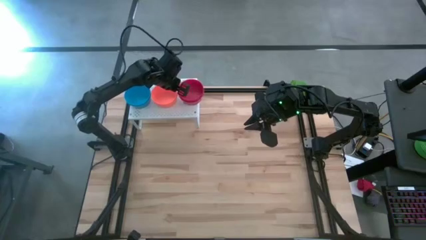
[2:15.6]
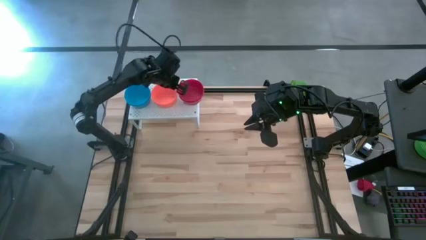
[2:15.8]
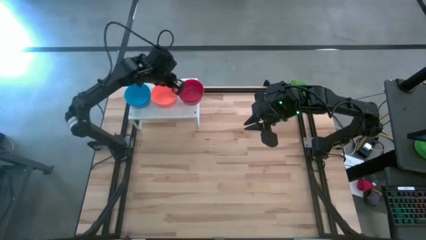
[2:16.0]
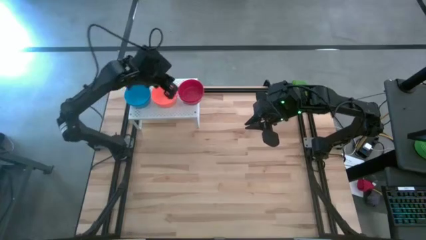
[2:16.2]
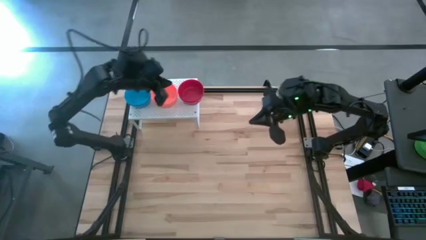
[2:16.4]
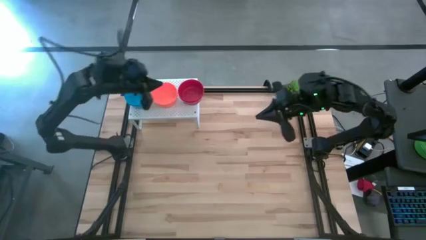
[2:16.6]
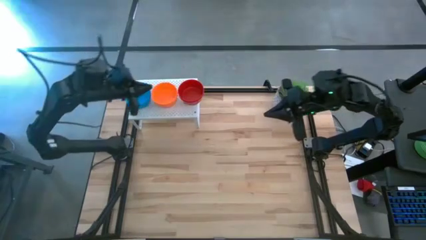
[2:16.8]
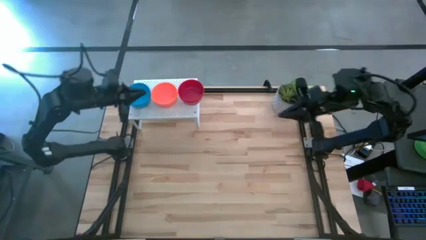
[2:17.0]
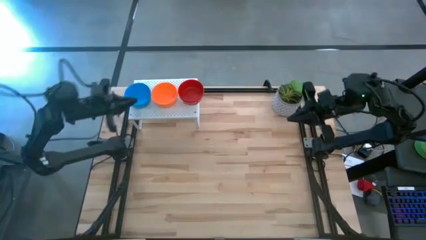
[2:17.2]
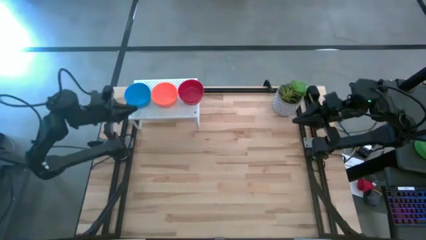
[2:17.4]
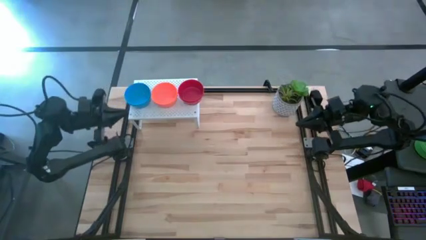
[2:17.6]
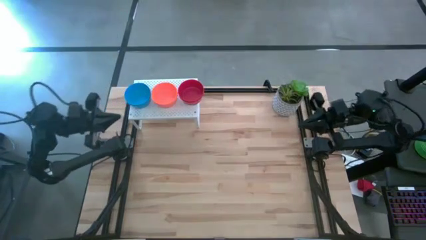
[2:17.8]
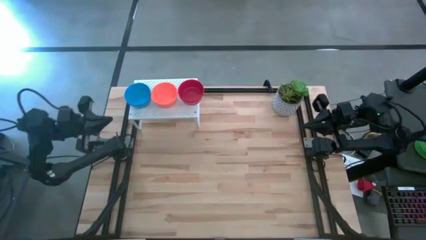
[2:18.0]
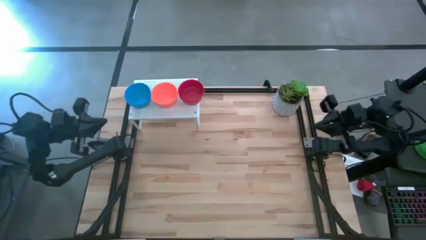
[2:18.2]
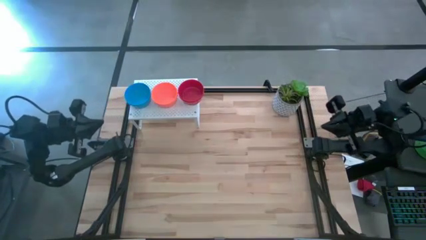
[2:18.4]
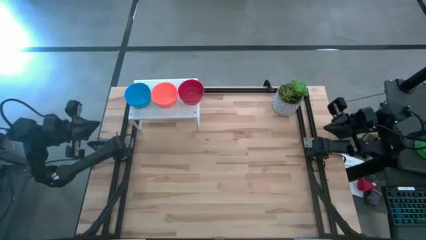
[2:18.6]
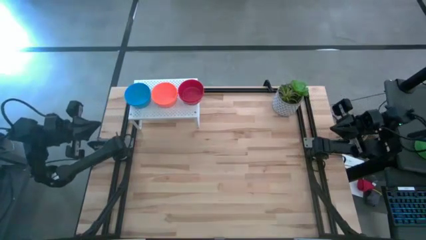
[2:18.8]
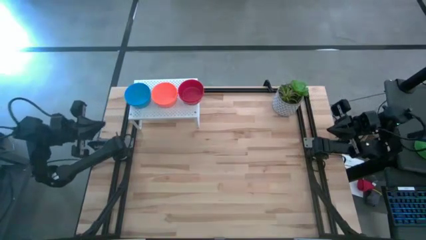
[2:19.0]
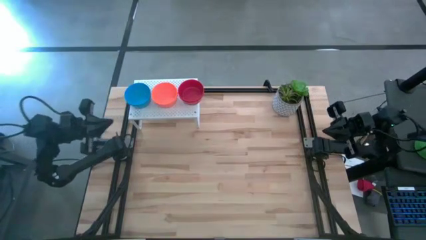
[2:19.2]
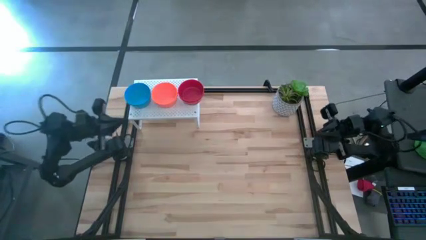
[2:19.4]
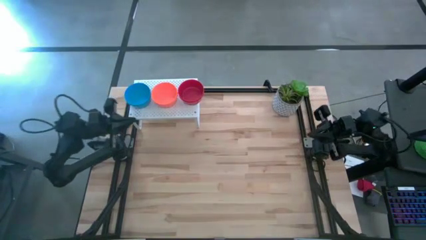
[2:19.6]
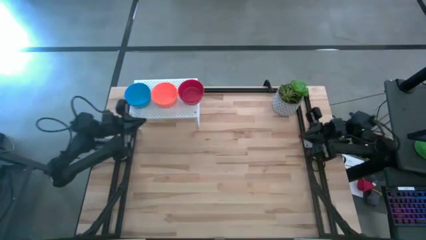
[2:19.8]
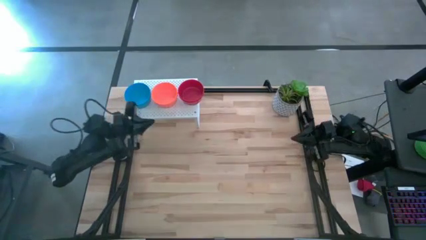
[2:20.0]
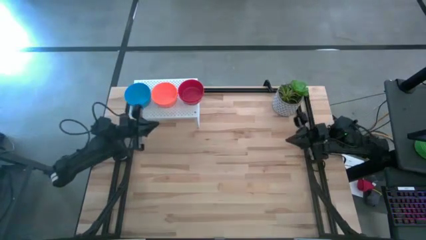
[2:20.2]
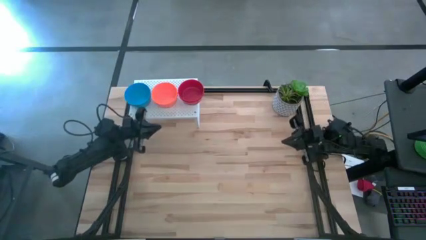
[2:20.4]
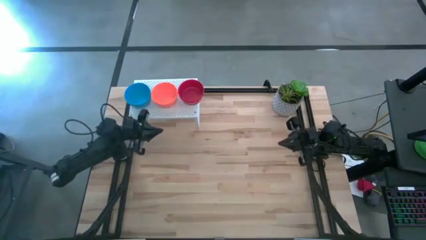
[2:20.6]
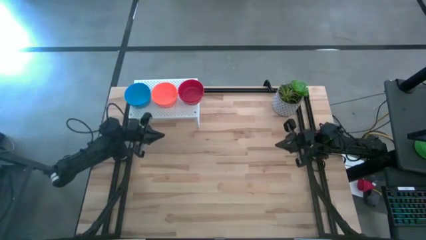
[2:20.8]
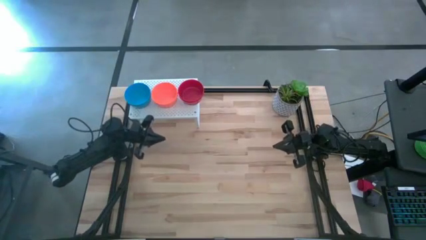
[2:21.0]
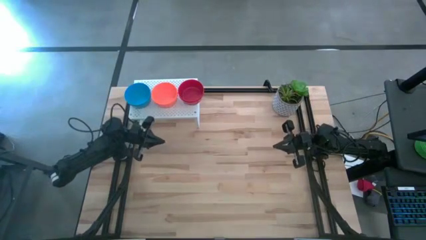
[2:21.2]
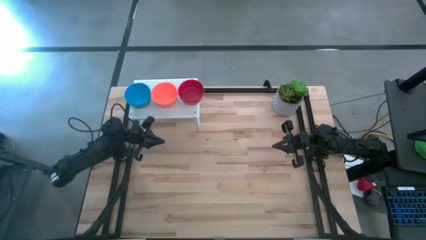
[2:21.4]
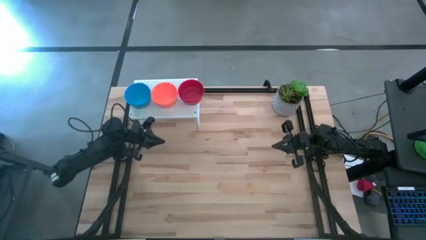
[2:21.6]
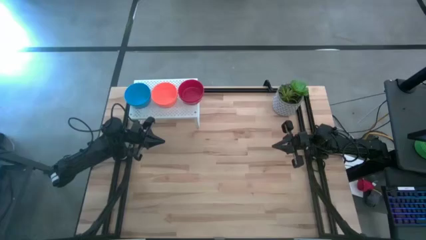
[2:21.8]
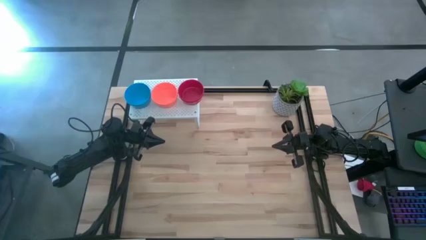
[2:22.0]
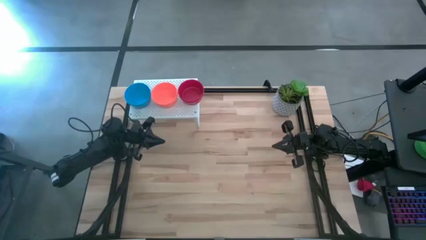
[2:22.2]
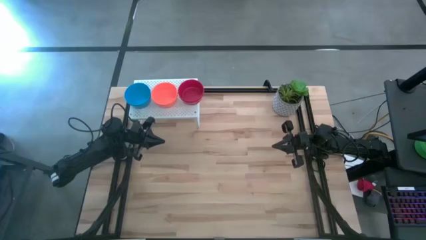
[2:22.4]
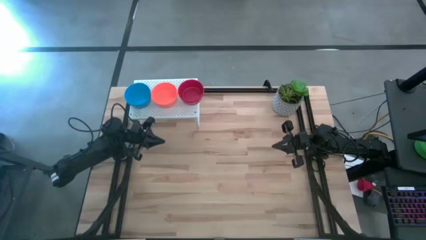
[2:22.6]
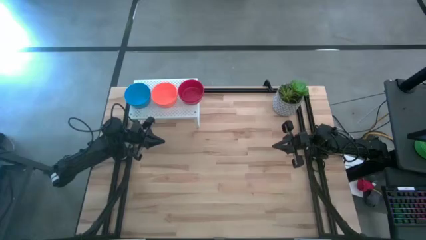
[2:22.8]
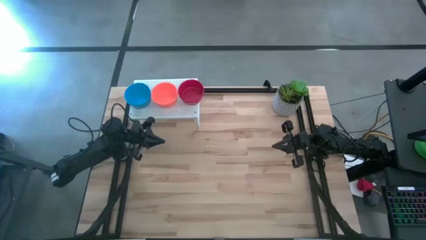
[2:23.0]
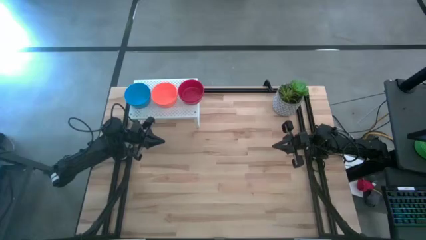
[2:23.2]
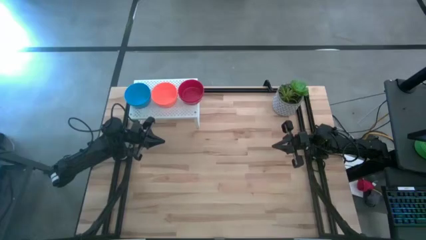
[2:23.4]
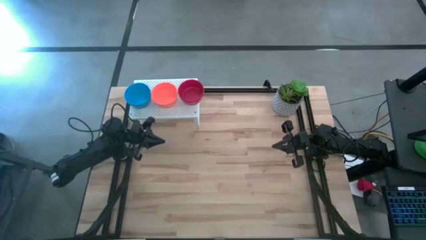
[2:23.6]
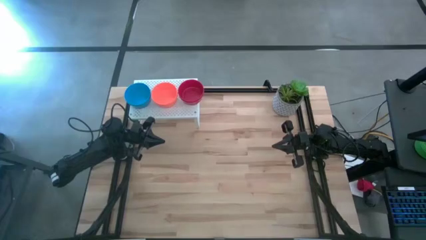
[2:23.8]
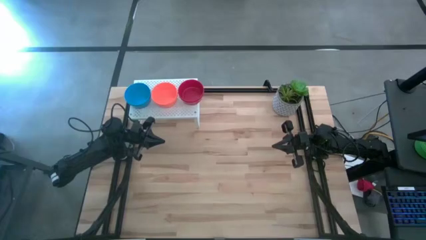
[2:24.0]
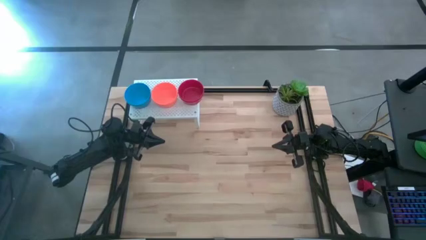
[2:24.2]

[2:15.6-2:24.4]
Task: Pick & Place Mini bowls
Return to Home Position
